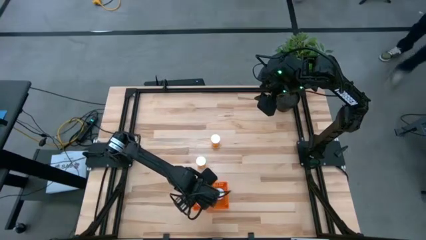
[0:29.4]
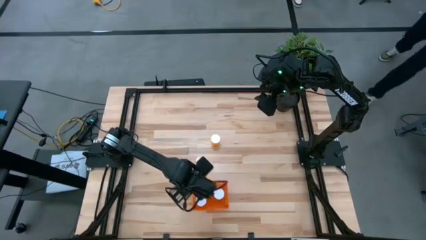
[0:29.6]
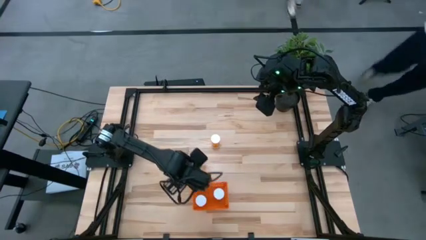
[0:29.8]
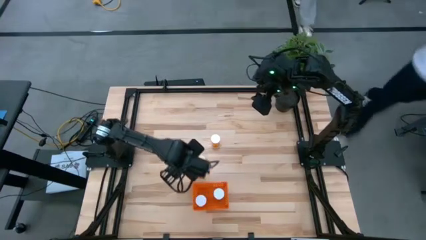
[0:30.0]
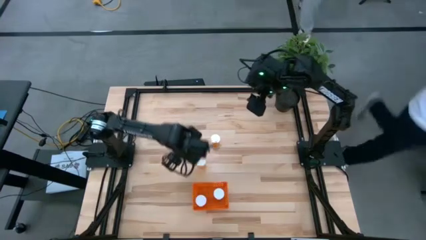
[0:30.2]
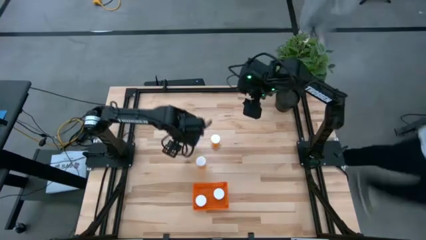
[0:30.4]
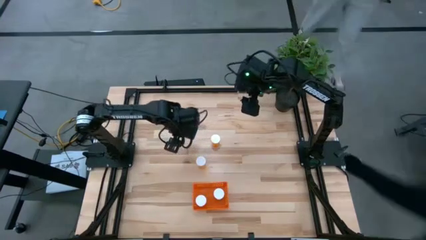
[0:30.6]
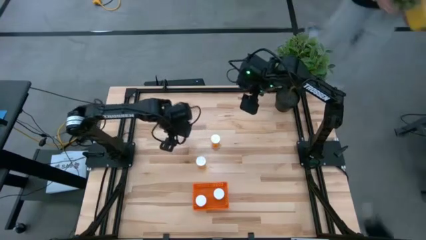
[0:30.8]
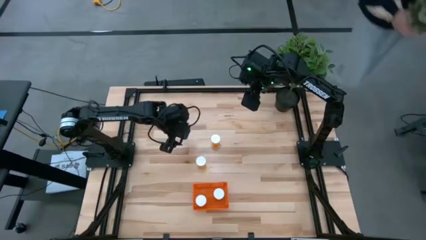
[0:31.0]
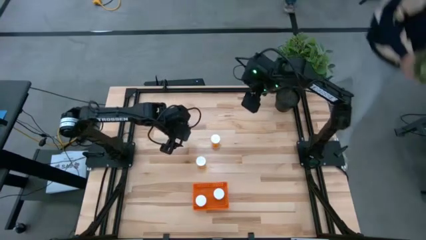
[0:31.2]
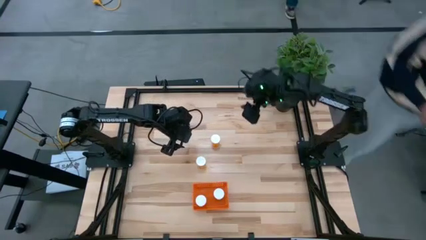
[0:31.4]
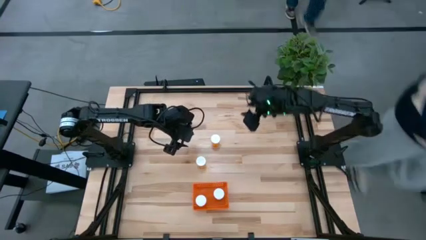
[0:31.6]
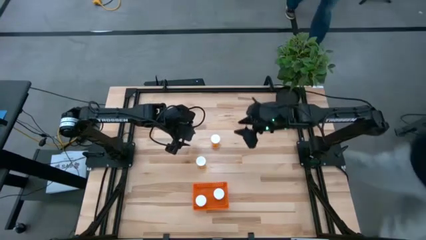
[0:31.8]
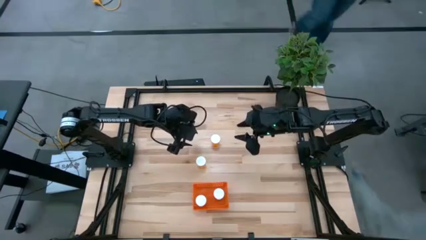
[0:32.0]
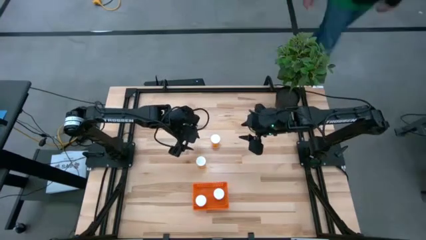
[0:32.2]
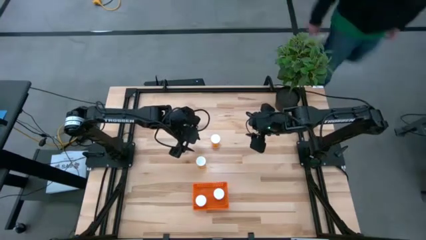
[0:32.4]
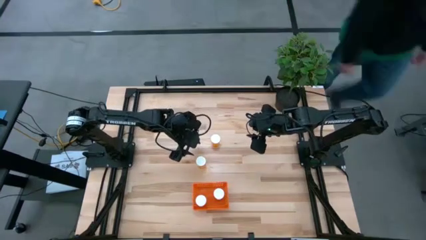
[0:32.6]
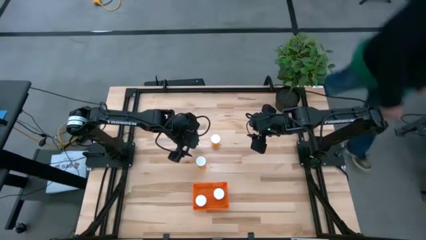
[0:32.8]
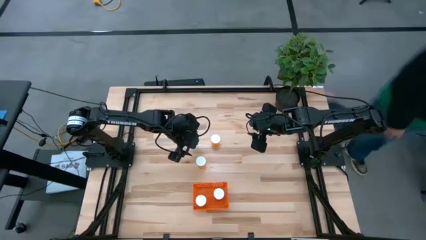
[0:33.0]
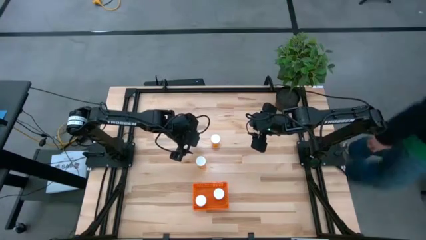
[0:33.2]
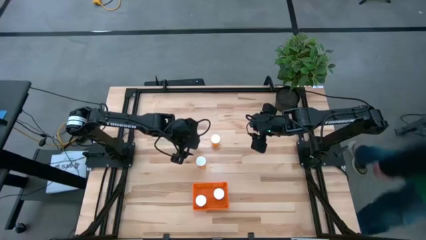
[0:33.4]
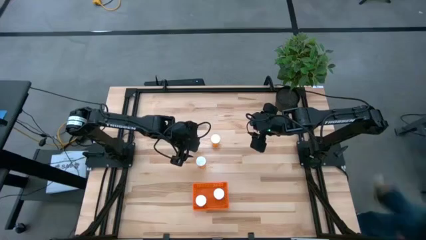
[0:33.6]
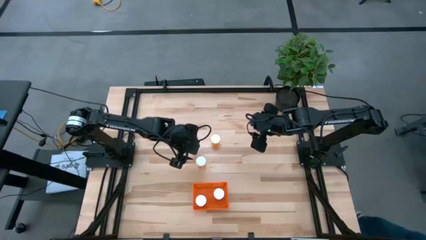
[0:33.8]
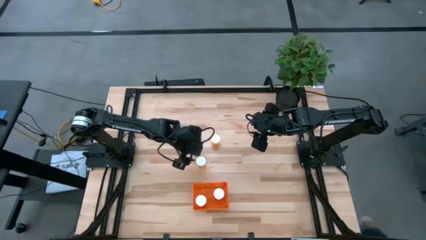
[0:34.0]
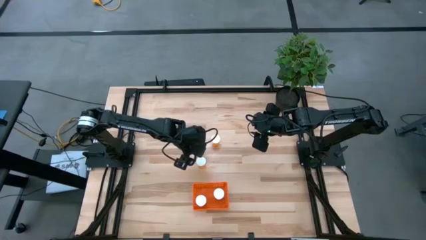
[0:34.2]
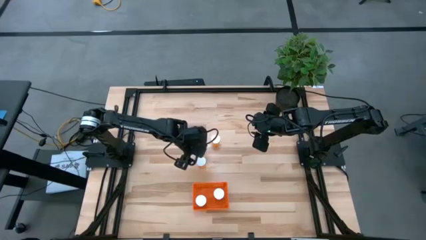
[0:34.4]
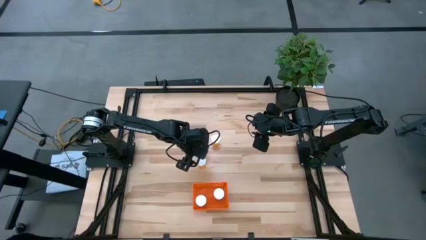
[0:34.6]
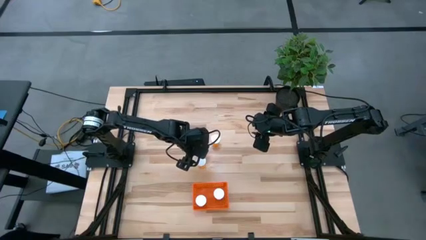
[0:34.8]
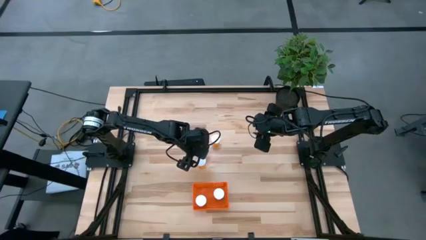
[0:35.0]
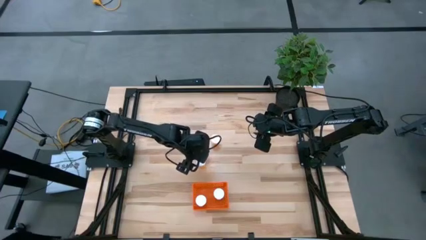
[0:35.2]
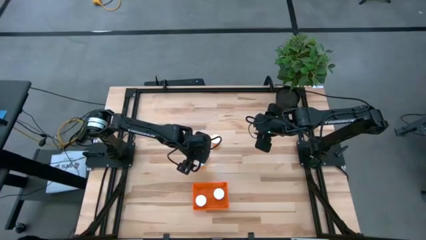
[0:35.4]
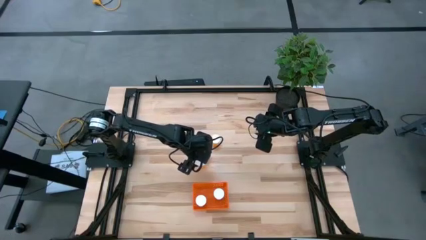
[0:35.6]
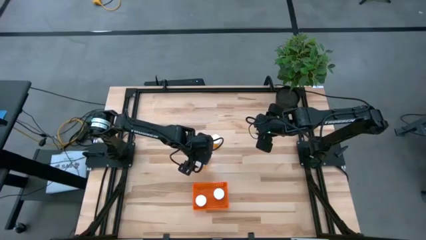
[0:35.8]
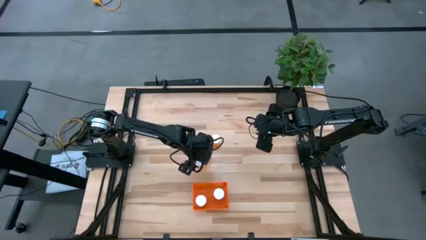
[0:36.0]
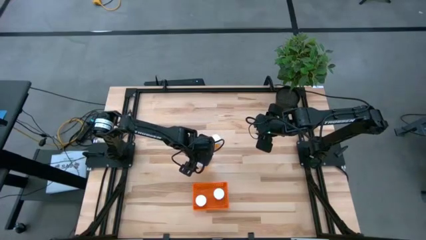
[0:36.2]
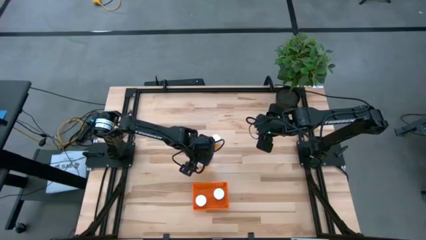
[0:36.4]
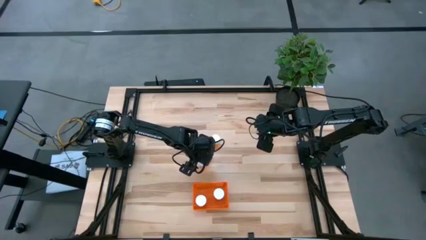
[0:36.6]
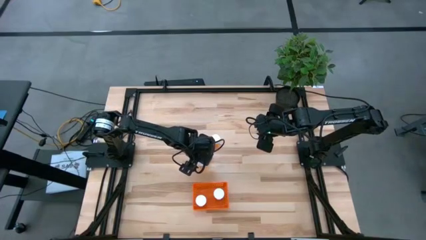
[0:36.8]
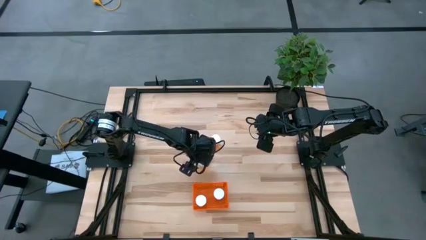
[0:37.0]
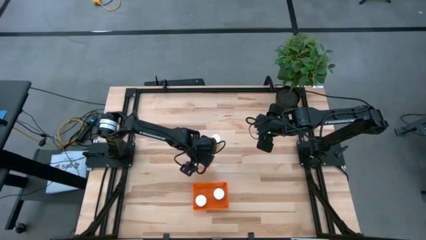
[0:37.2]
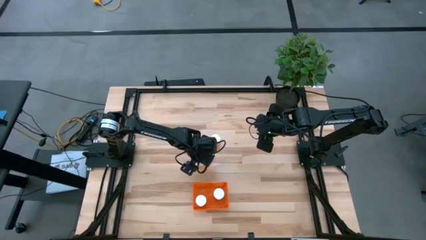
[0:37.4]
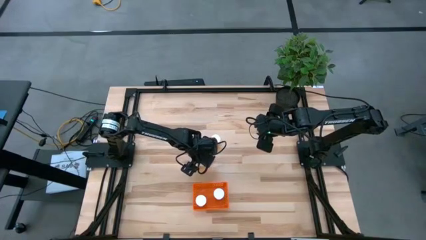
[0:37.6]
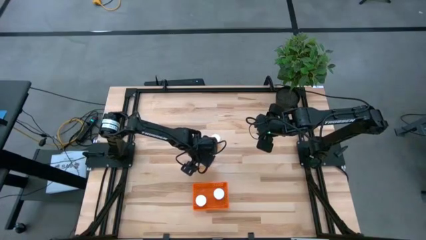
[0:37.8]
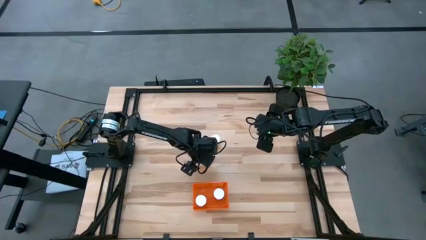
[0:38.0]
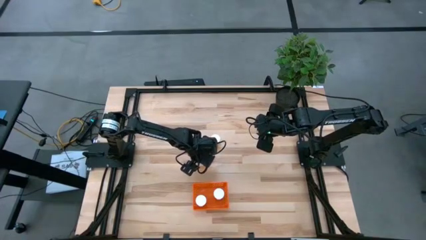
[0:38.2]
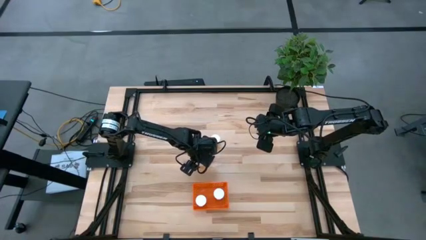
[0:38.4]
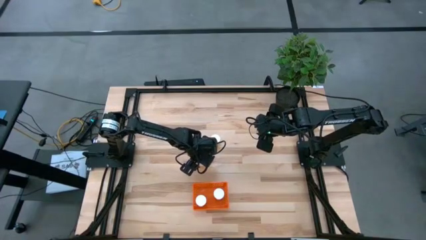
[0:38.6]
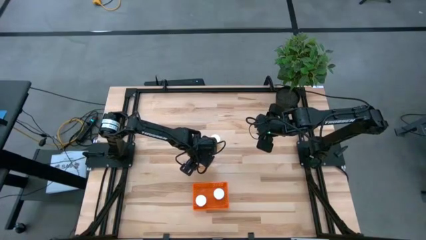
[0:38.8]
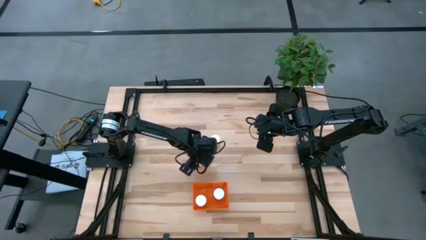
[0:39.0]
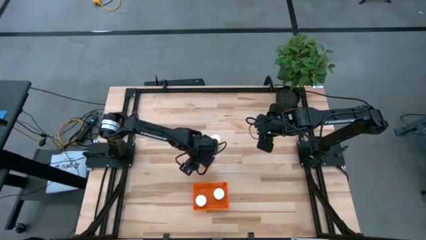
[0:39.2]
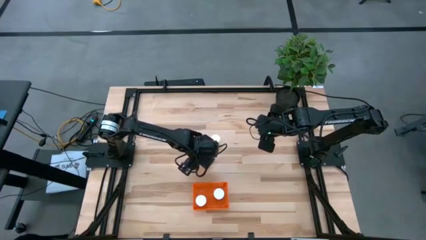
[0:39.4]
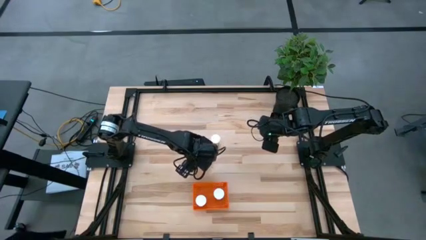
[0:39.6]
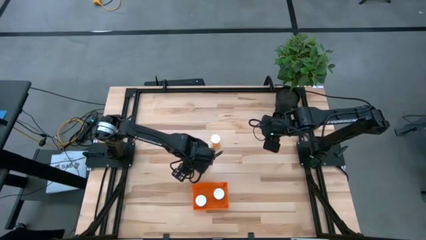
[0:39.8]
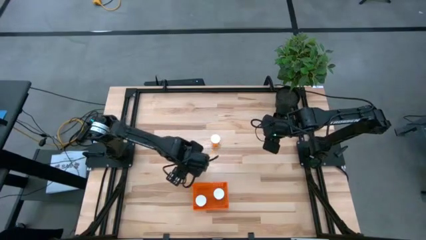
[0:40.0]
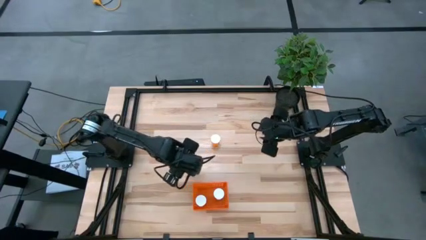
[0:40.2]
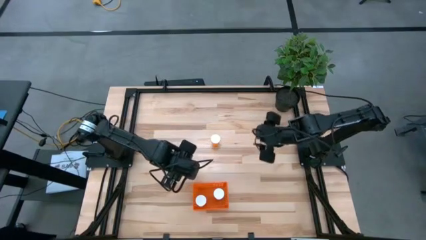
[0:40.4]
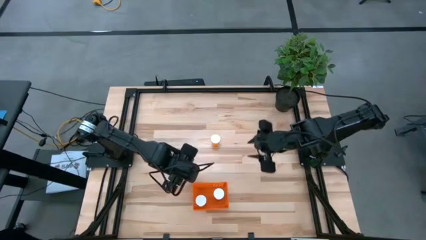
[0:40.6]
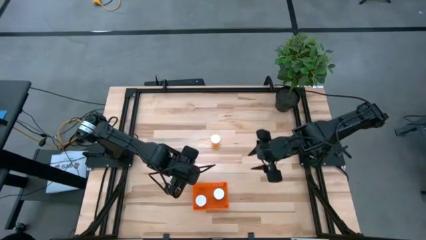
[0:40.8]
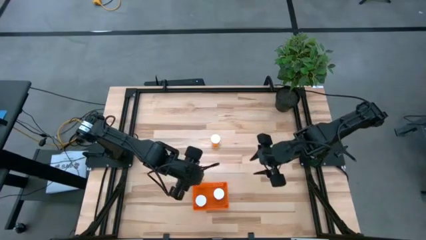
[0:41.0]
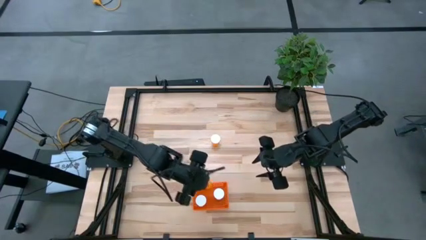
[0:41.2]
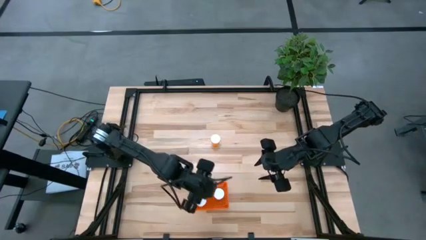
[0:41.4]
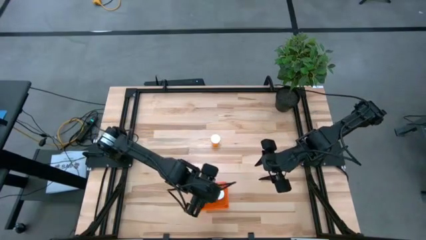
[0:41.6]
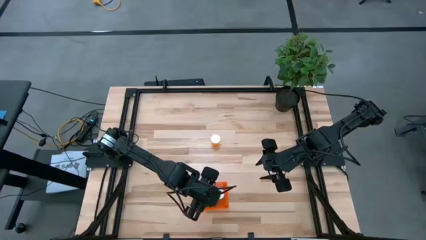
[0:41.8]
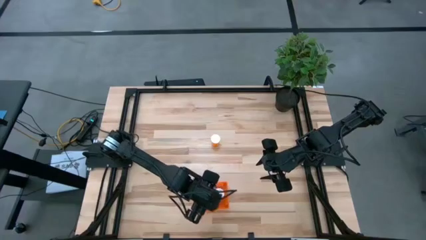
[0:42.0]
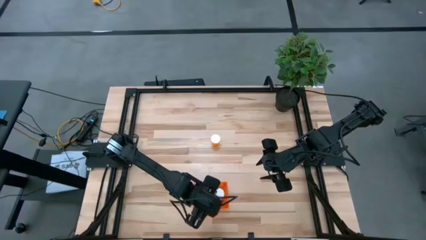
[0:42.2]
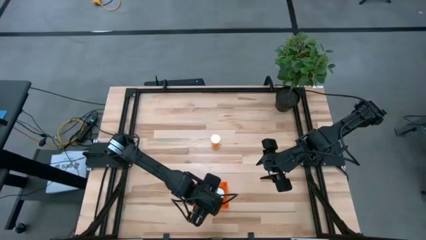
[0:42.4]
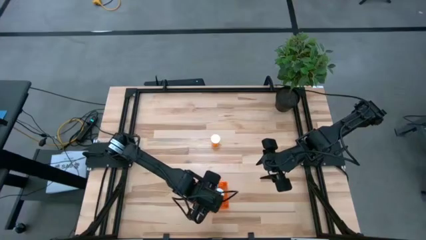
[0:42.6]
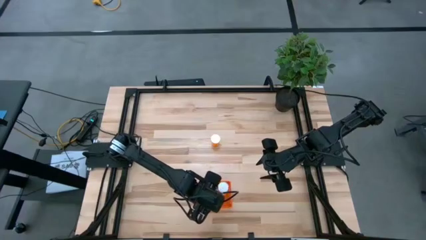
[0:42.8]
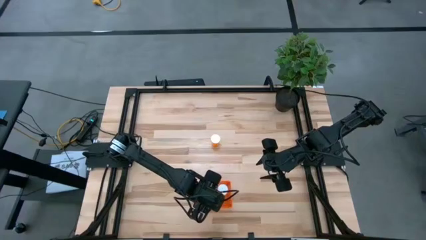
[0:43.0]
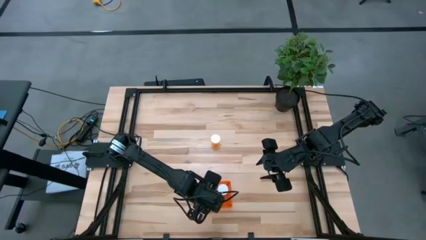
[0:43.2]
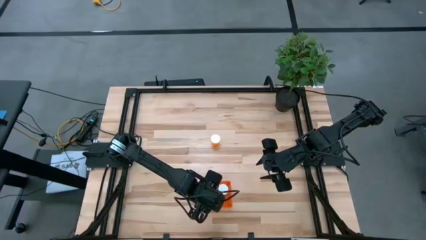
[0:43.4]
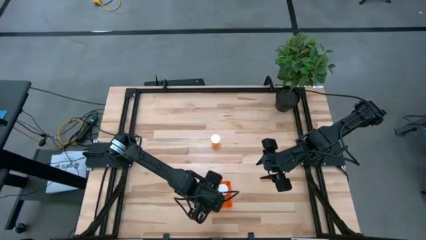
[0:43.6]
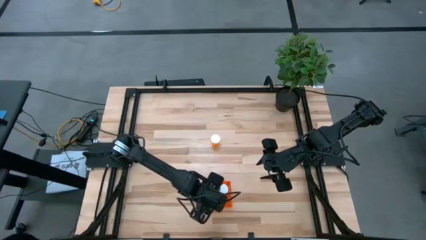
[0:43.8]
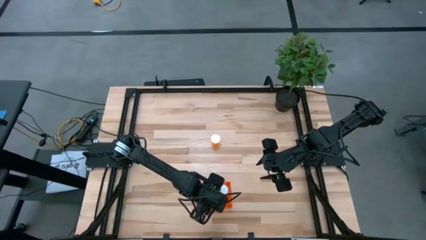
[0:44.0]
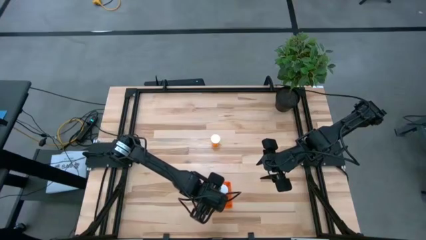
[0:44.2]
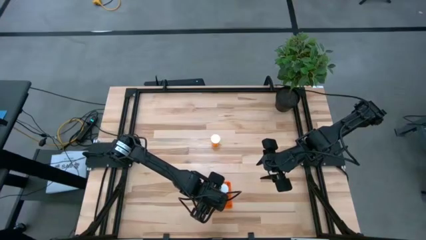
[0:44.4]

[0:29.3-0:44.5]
Task: Pick and place pill bottles into a basket
Put the orange pill bottle into the orange bin
